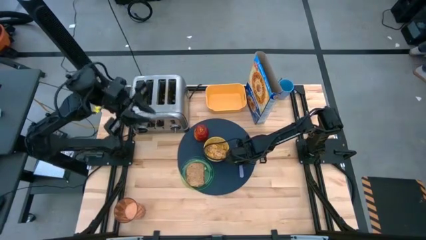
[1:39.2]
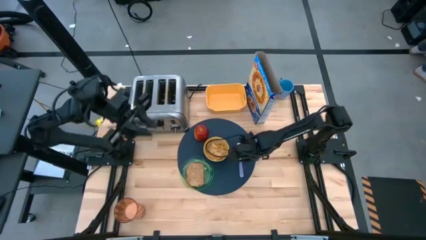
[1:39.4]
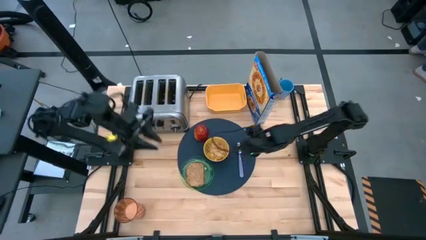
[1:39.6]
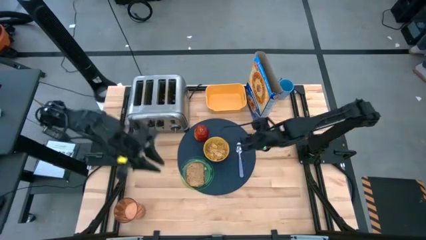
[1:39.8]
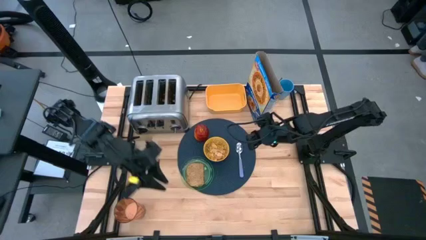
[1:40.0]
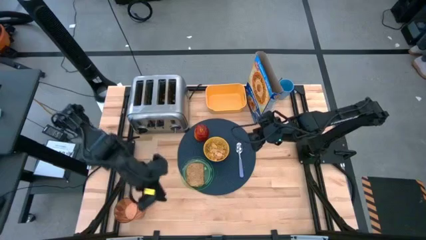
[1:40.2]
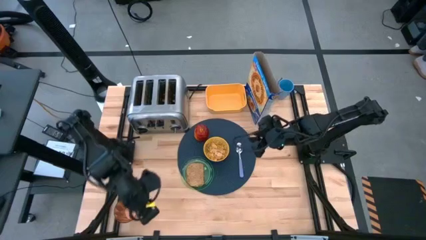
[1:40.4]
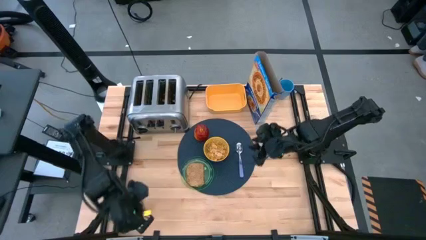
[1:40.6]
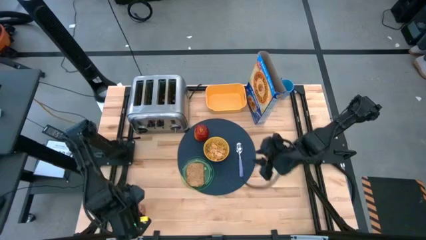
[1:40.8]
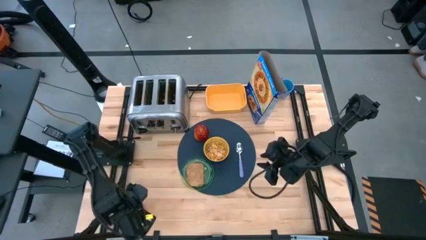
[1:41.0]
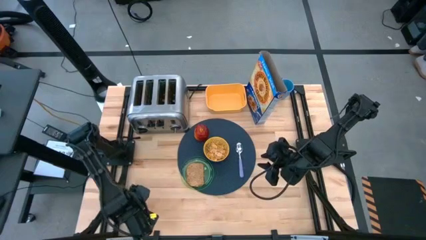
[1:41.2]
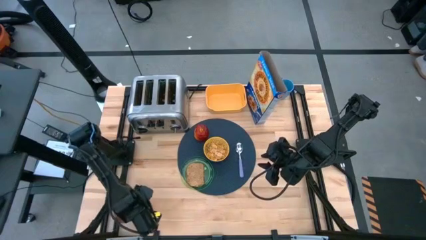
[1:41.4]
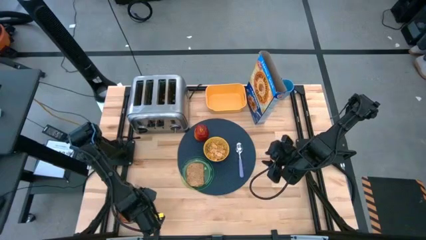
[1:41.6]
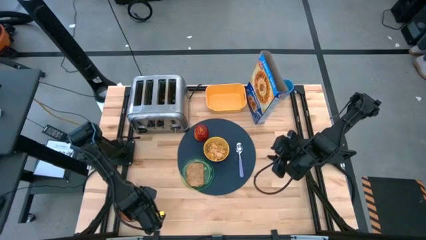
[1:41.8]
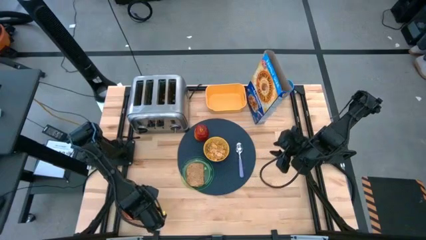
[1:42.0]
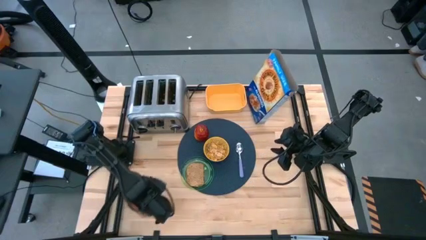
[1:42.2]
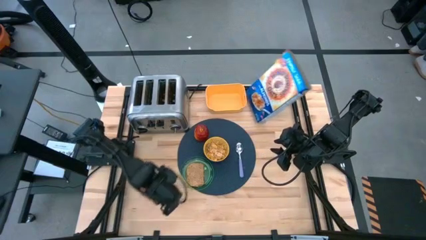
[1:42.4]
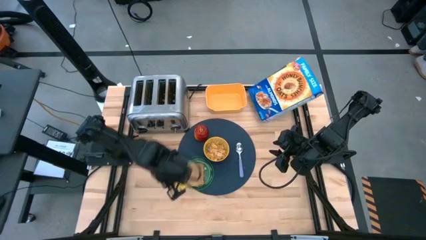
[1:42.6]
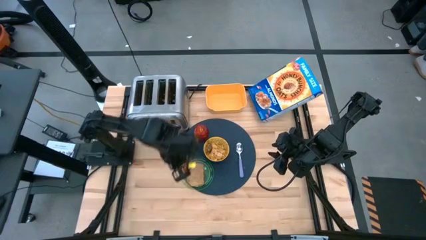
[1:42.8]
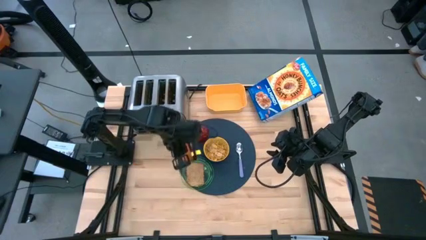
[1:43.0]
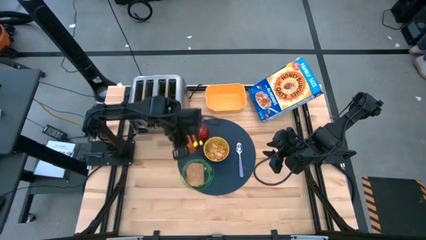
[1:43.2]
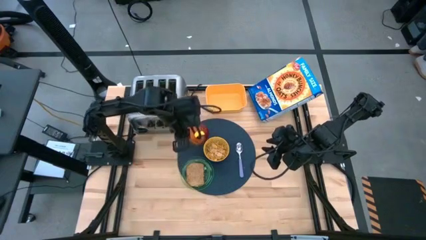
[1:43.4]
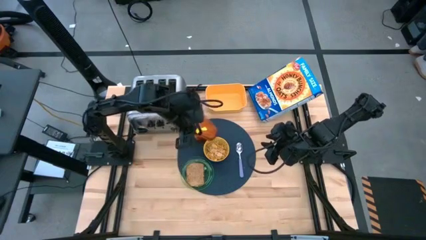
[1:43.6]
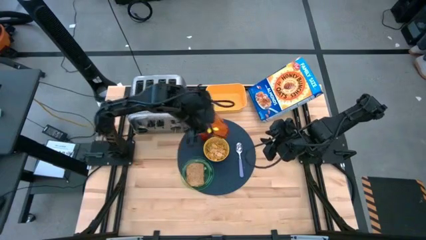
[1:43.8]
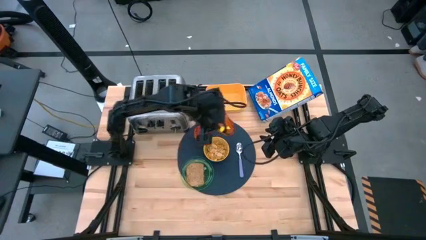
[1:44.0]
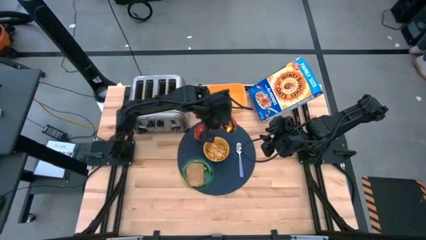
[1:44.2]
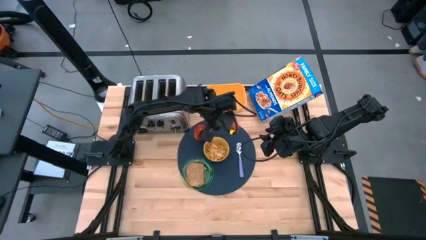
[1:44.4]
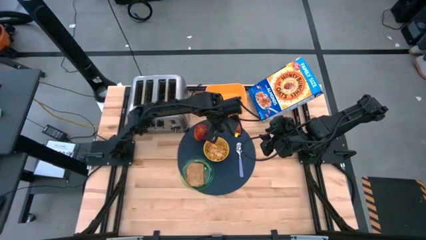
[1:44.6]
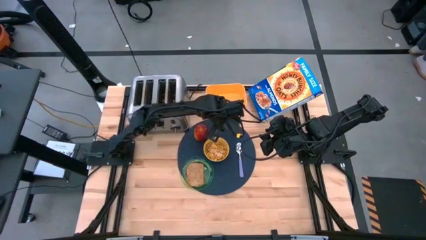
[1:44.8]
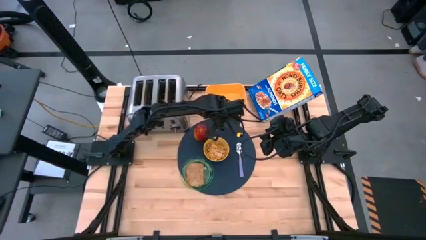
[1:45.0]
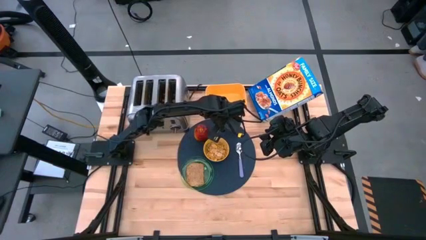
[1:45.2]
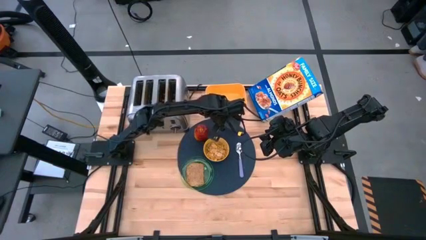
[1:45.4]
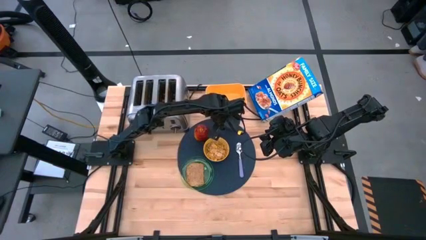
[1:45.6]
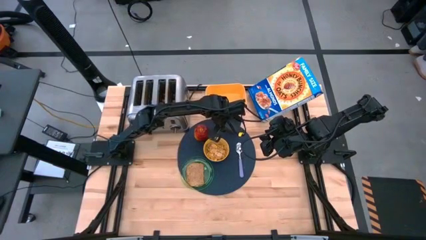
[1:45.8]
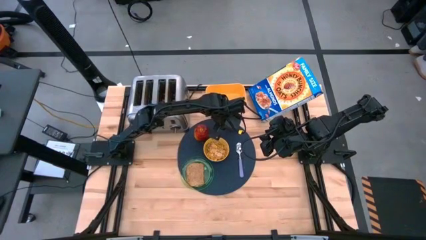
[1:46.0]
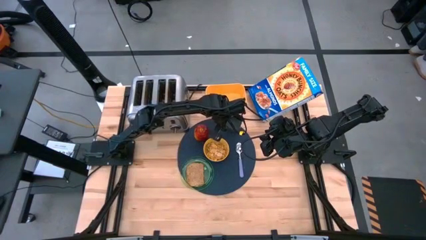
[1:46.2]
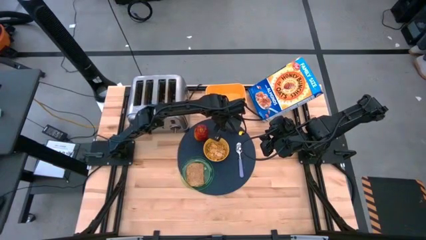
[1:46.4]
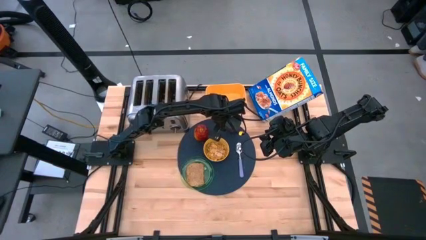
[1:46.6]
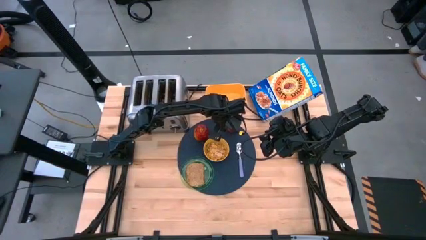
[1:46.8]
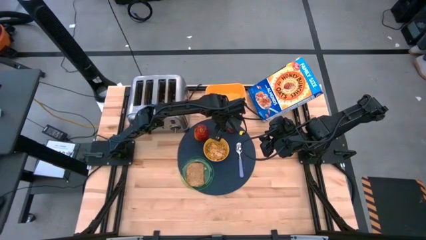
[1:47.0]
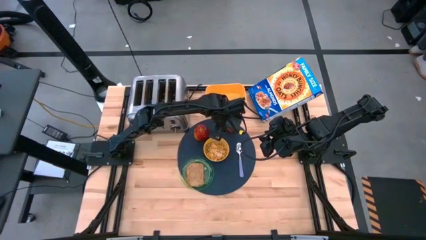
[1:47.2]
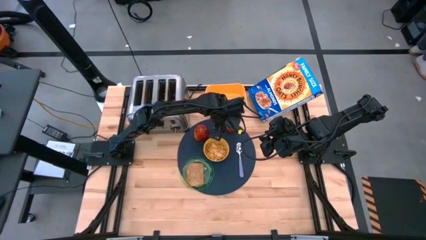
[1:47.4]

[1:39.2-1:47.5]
Task: Arrange a breakfast setting
Put the orange cup of milk on the table mat to the top right of the yellow bowl

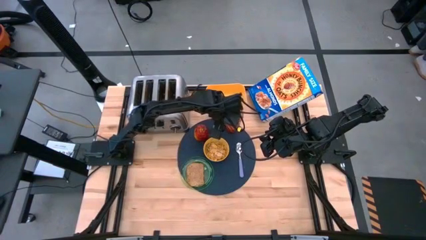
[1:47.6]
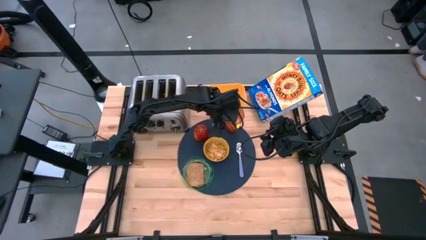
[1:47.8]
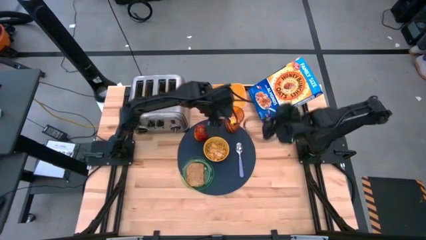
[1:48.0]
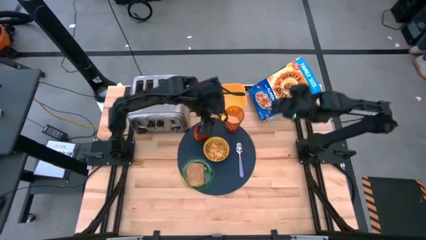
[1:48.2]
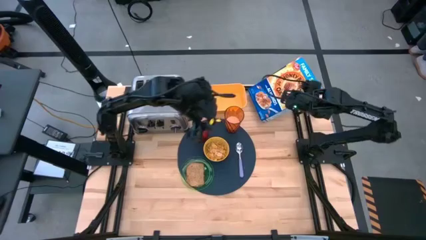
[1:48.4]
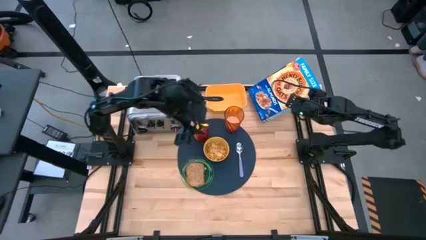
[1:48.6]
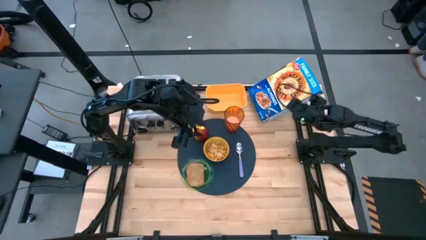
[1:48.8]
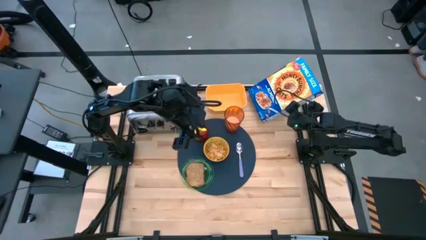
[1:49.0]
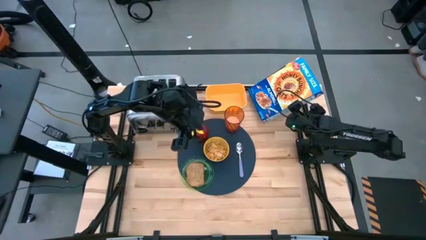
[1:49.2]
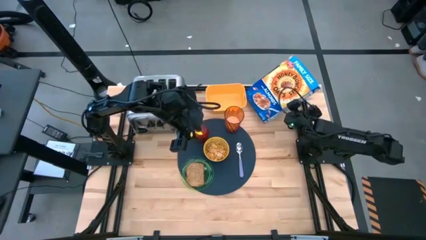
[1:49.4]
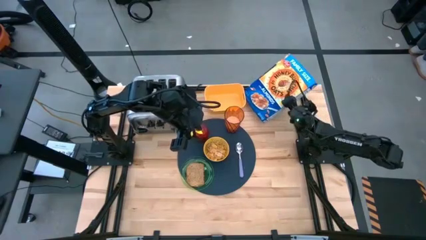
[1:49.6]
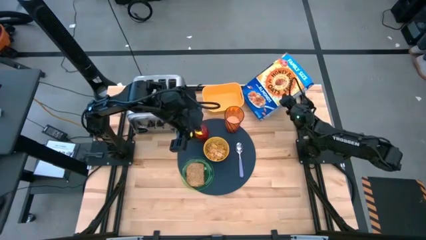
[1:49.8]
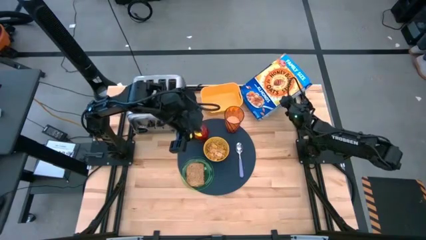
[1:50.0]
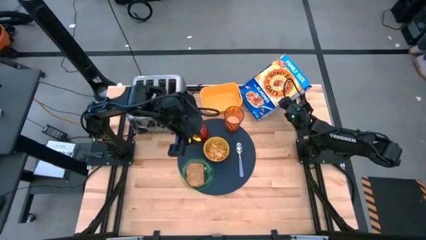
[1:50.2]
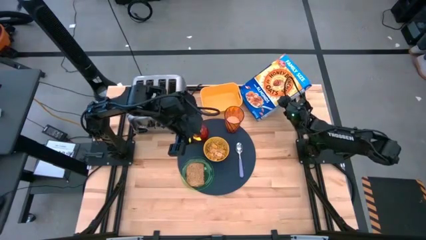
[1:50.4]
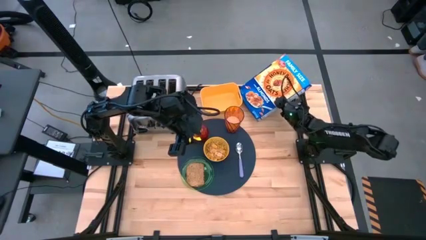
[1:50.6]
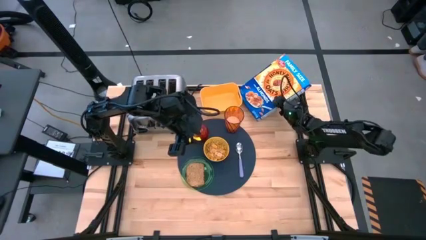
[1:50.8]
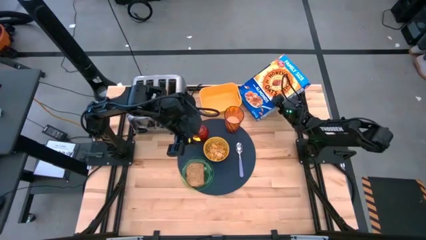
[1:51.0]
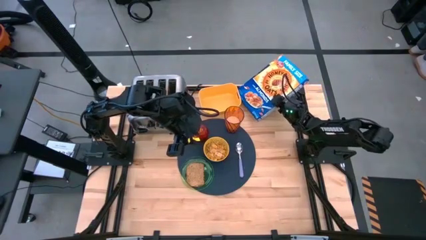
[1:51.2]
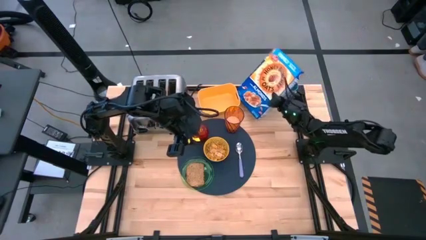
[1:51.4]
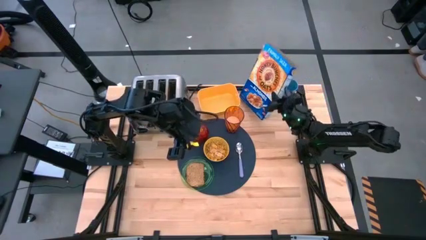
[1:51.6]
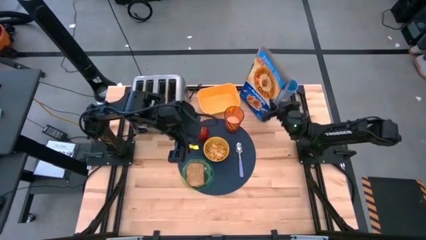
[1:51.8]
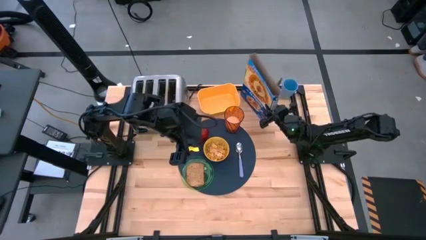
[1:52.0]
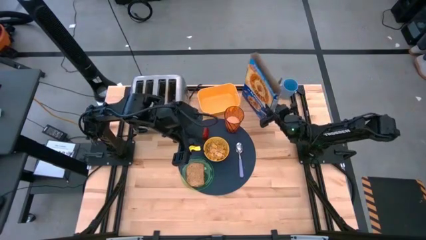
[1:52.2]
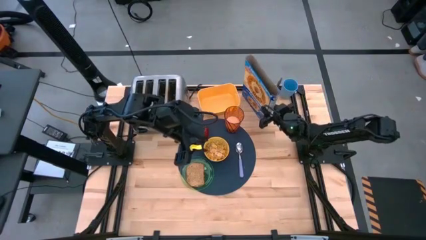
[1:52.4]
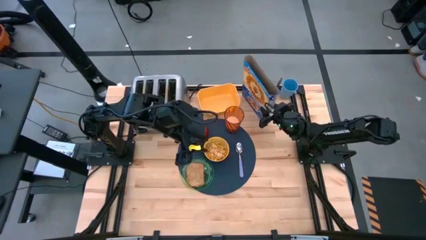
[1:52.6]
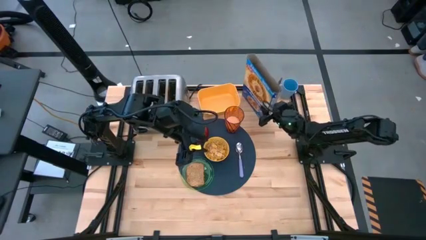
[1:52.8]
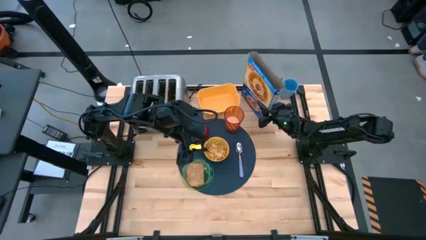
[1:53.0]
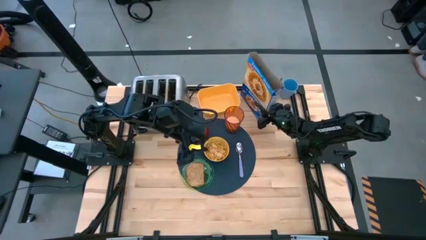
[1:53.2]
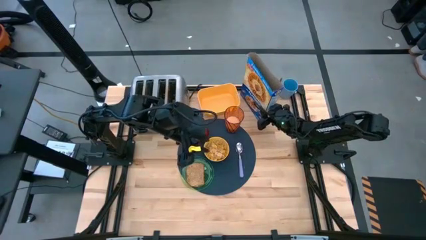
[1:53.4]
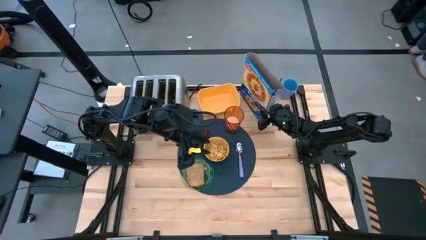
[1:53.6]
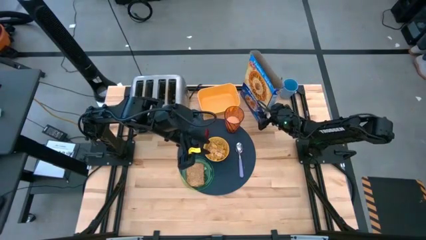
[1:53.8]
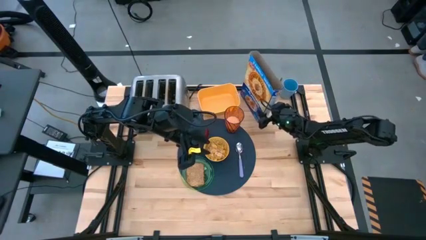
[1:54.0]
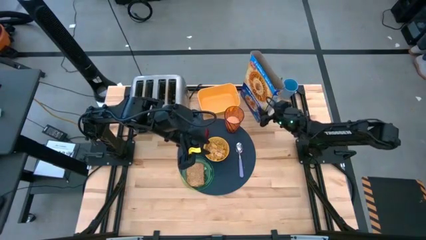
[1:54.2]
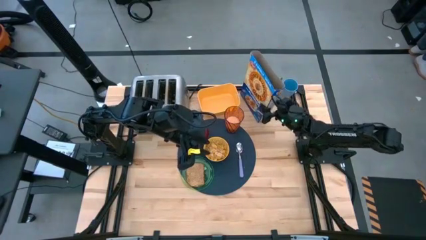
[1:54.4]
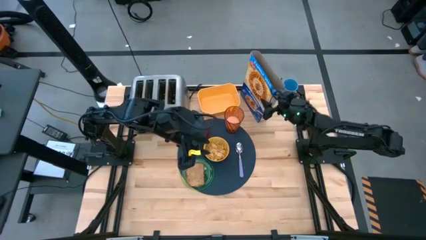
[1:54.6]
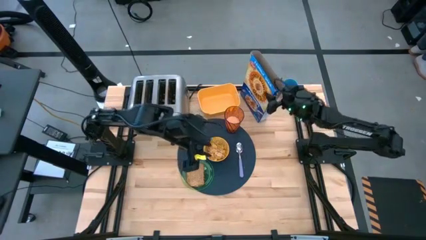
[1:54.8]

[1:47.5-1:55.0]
Adjust the blue cereal box

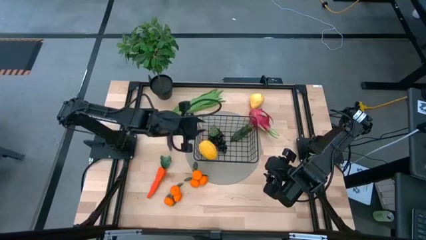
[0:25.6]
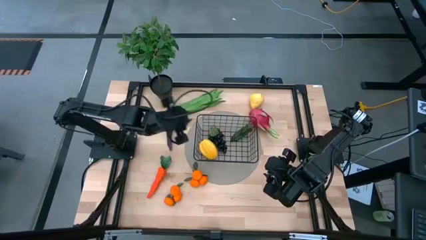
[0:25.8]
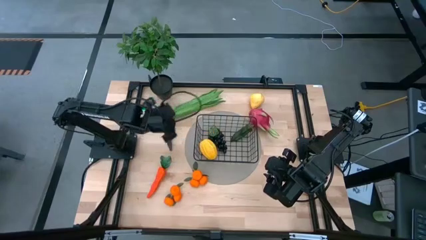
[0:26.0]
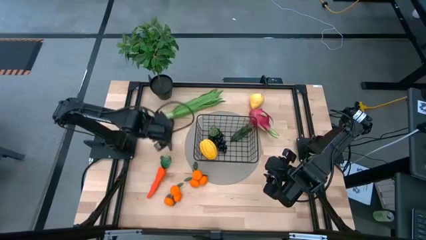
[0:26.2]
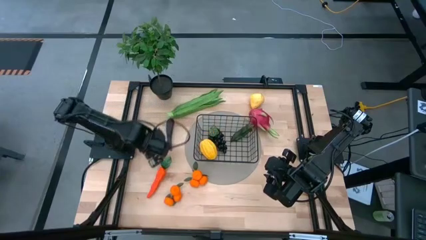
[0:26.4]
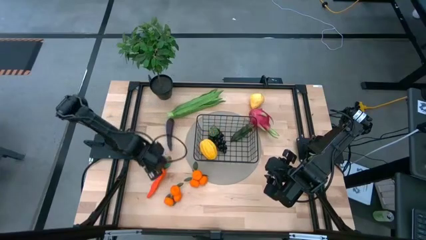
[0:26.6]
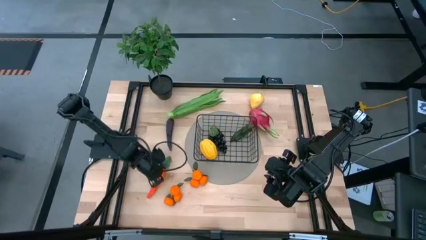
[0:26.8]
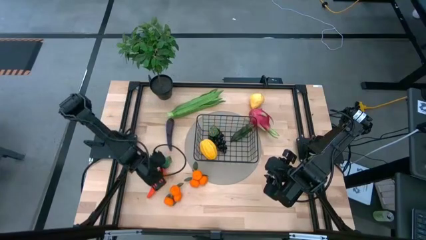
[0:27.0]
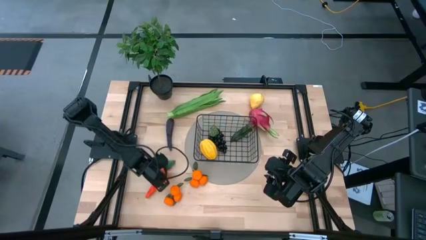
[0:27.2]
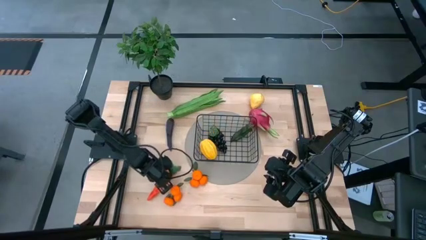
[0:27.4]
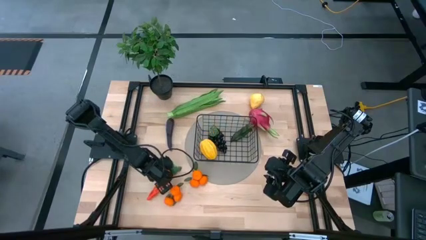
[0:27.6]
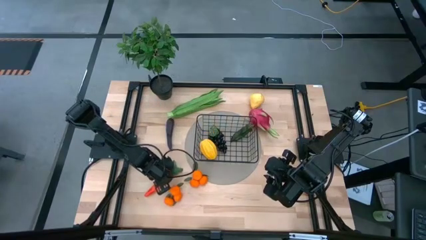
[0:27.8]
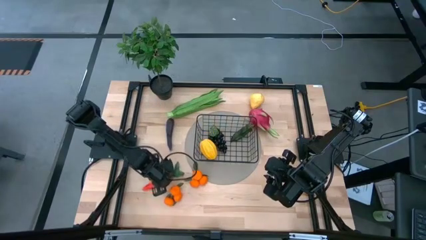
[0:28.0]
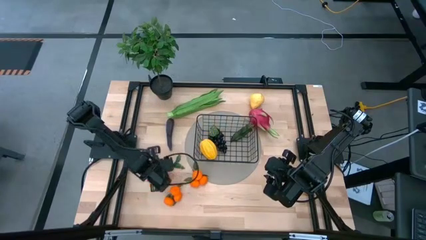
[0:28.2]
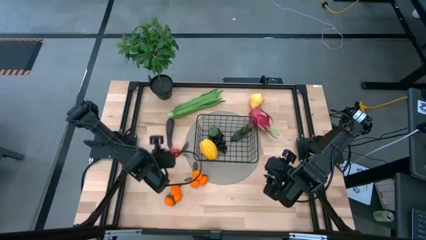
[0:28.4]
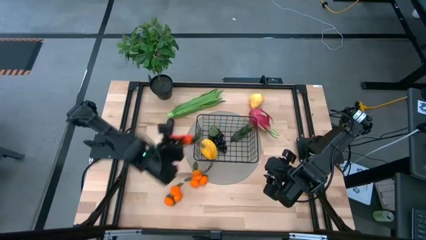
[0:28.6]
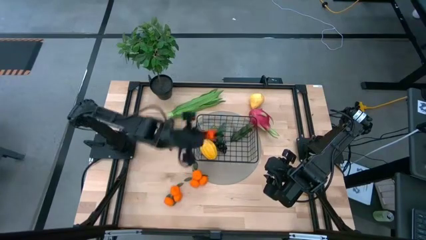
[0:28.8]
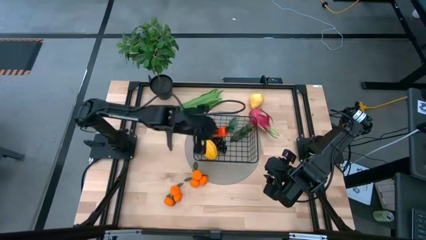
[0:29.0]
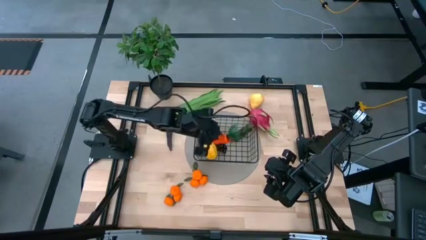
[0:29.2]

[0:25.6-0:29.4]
Task: Build produce basket
Put the carrot into the black wire basket
